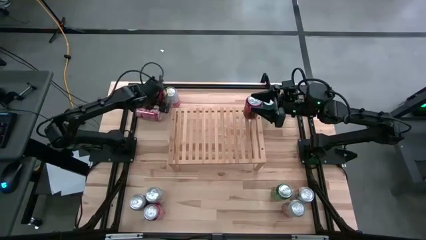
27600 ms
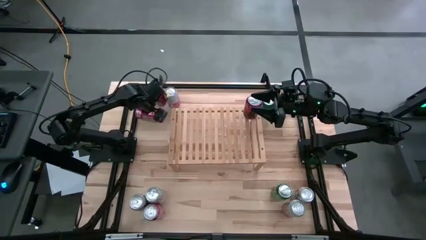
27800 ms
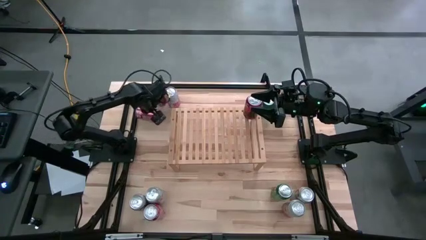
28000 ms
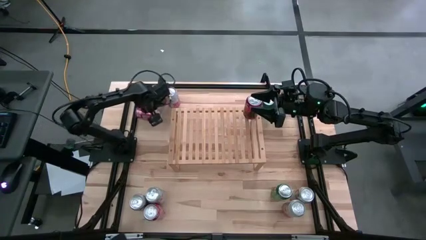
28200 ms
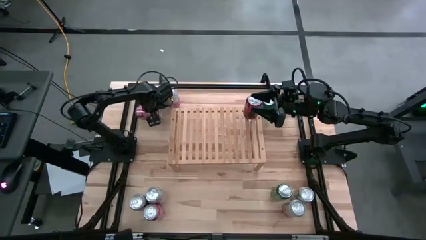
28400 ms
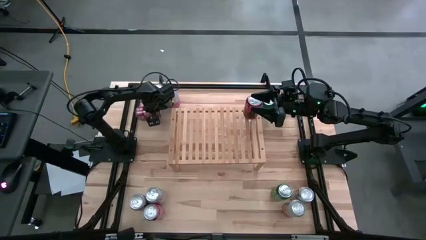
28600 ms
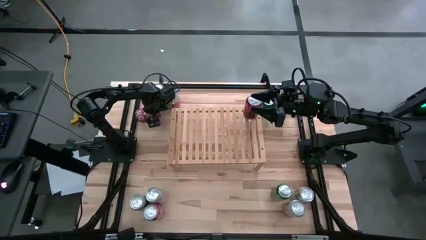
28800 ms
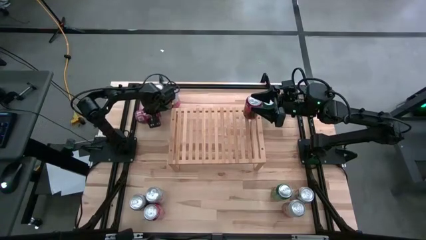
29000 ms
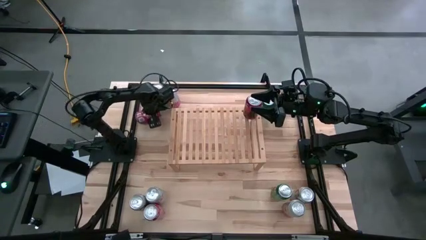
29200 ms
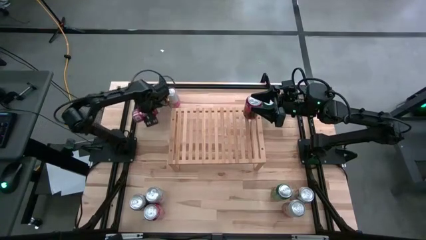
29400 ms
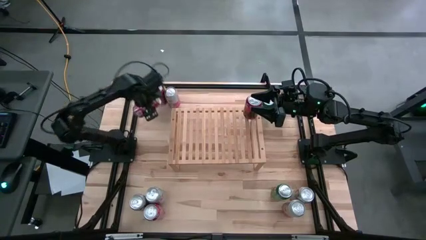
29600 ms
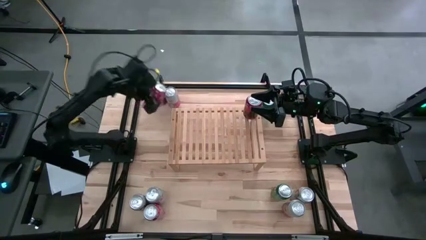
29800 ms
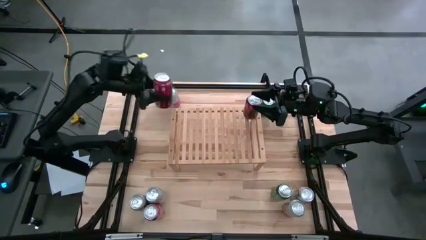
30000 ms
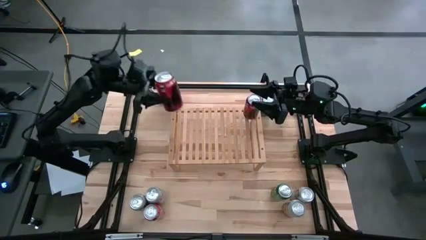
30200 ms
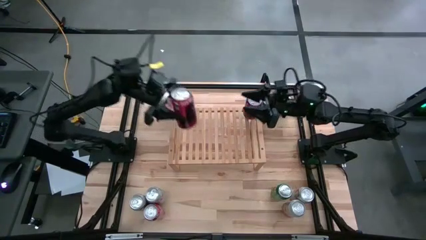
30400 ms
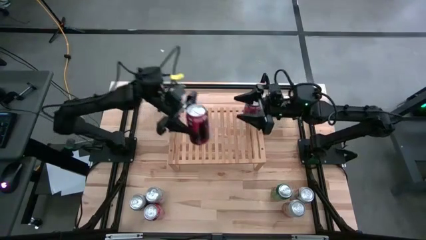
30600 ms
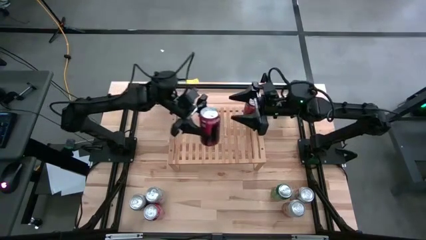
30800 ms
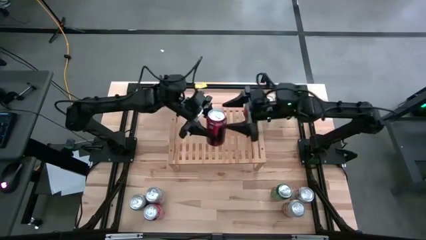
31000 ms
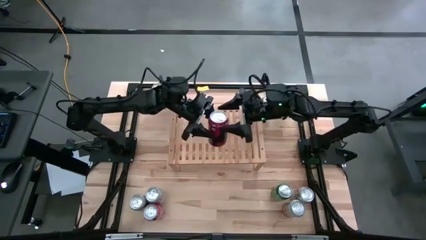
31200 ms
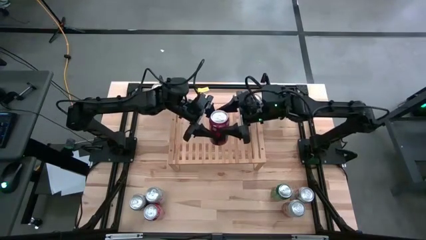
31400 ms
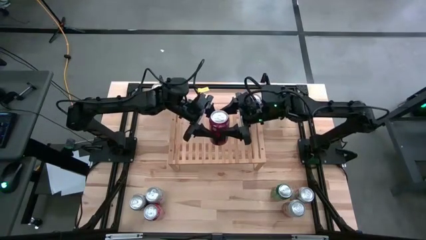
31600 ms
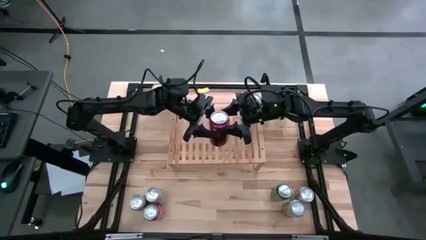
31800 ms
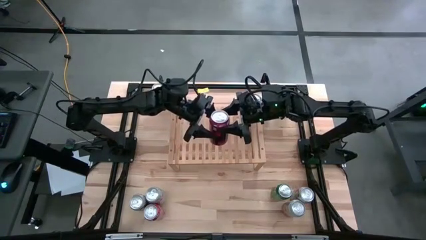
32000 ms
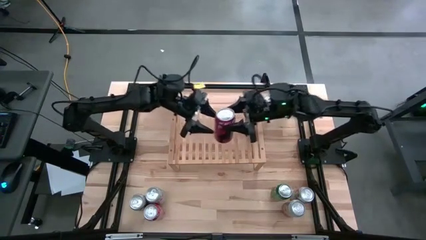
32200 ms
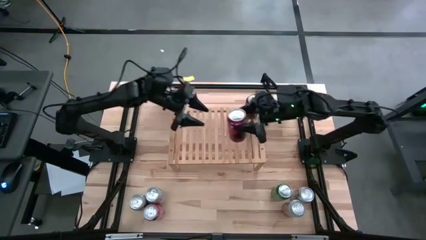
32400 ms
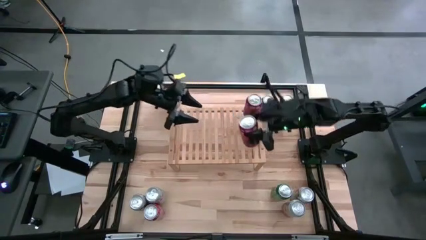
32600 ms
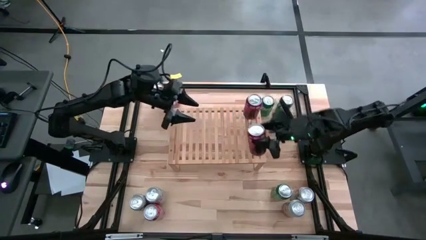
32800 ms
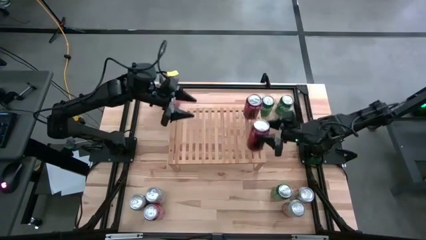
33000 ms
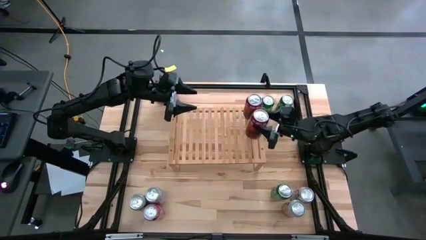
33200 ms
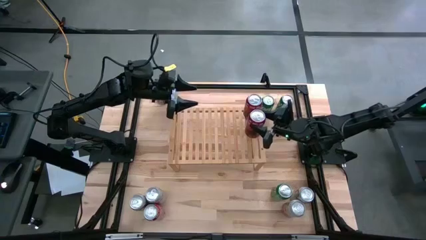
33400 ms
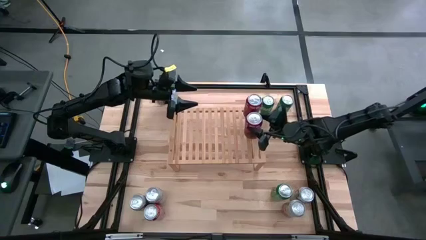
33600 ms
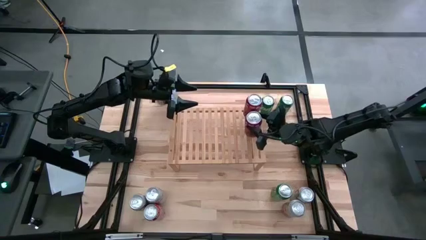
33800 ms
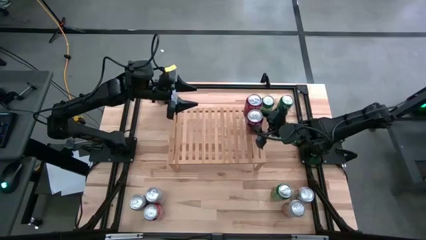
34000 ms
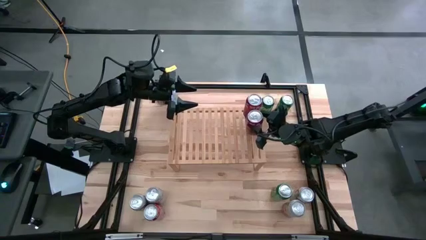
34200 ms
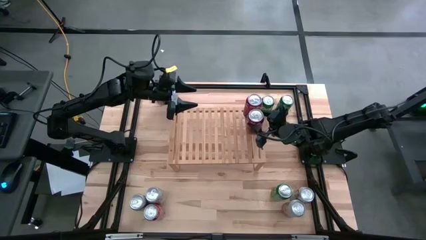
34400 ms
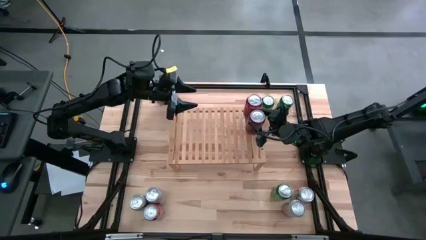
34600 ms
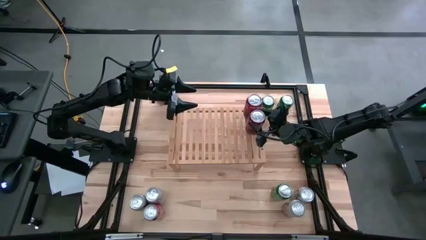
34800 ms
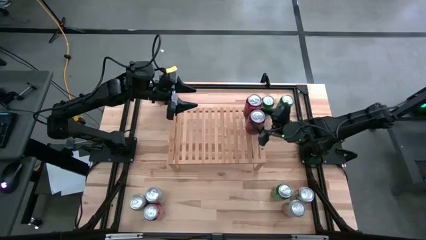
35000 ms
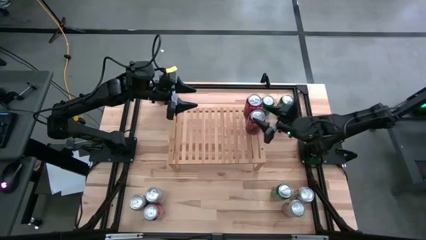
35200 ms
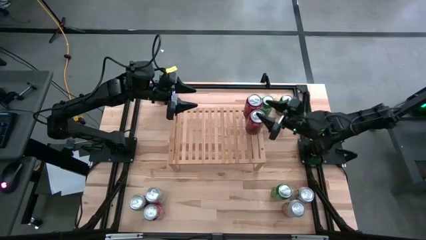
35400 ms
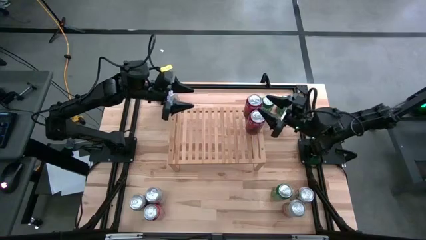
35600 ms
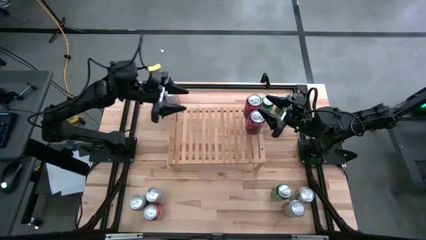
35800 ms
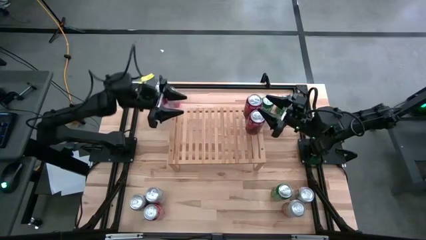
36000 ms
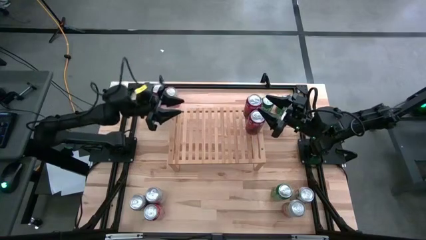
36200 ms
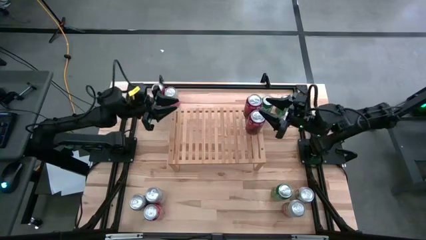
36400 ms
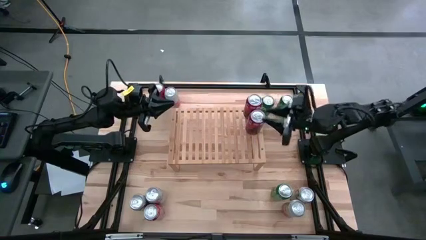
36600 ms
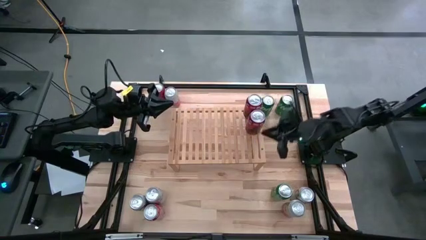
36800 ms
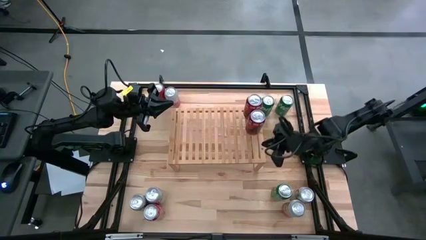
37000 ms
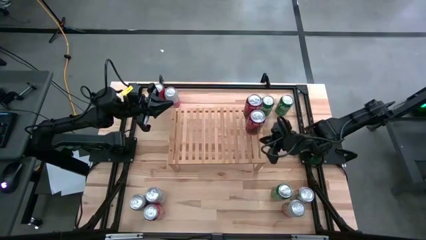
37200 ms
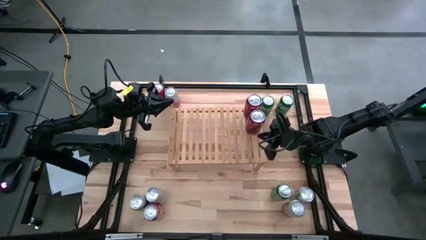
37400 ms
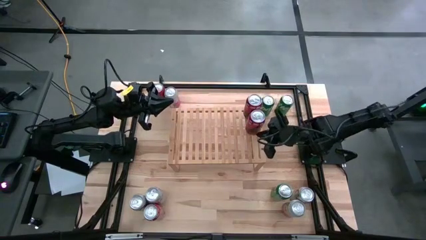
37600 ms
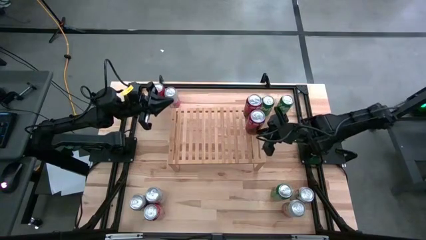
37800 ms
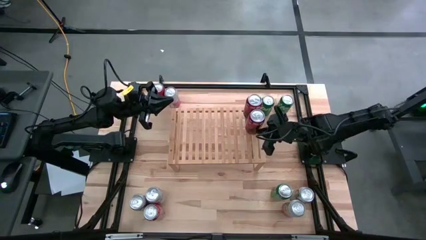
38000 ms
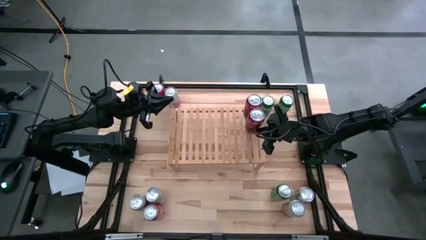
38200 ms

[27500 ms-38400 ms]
Task: Place canned beverage on shelf
Put the top left red soda can on the shelf

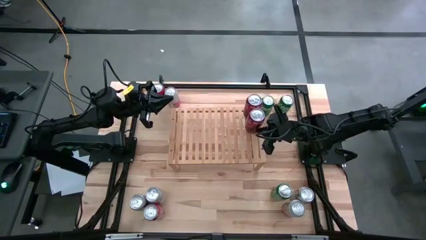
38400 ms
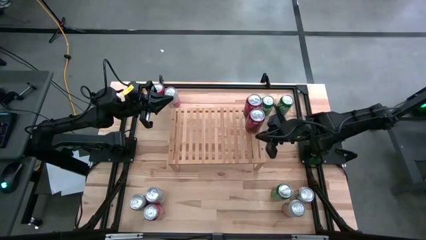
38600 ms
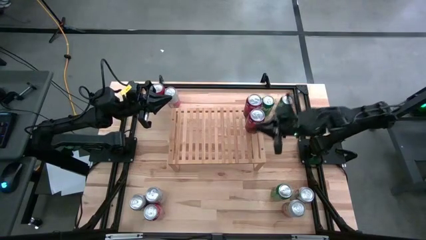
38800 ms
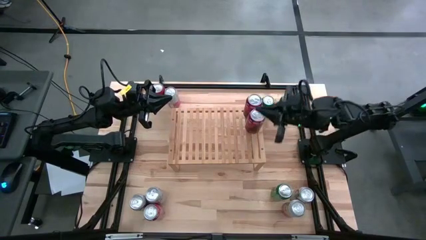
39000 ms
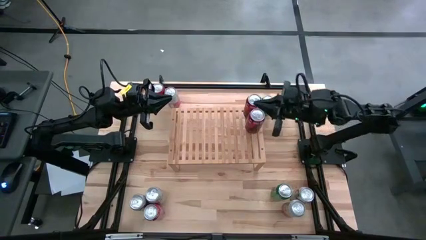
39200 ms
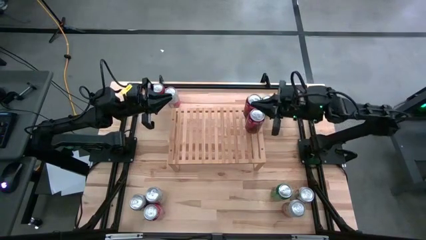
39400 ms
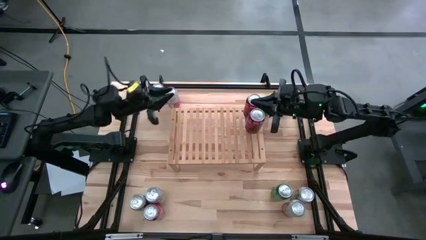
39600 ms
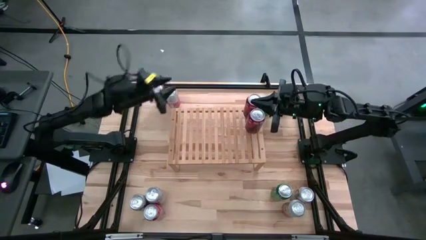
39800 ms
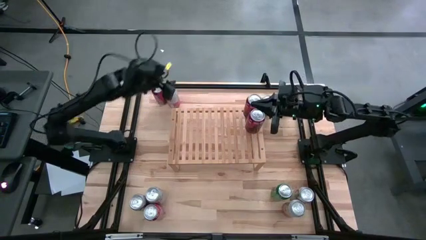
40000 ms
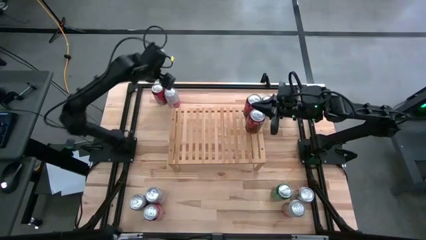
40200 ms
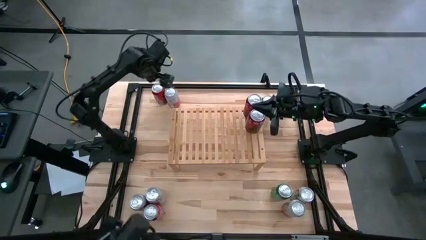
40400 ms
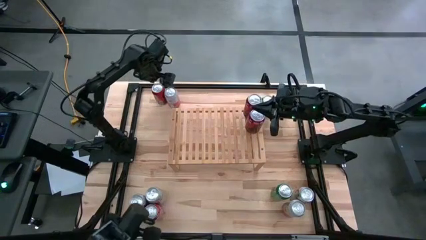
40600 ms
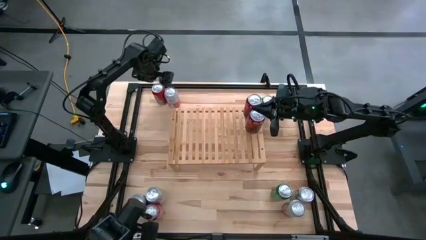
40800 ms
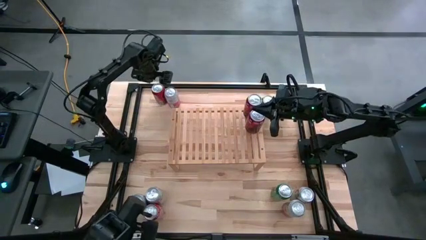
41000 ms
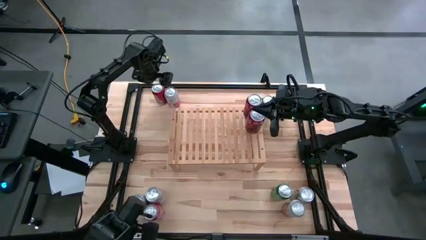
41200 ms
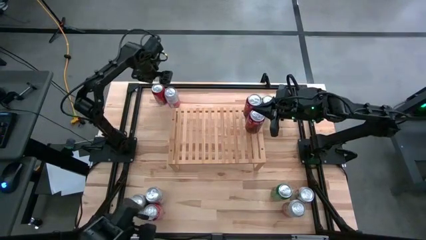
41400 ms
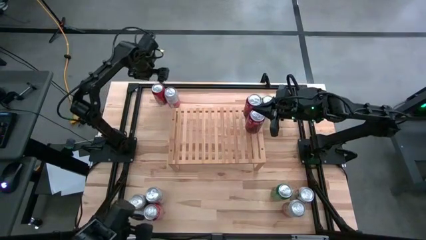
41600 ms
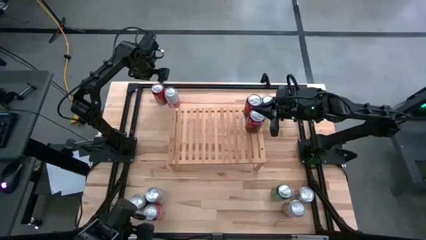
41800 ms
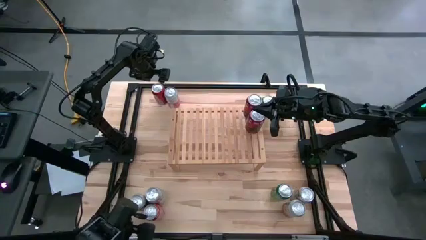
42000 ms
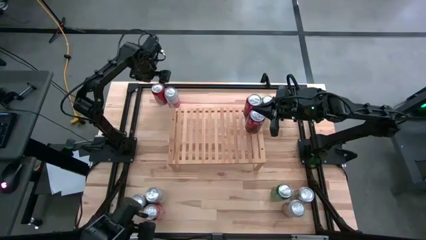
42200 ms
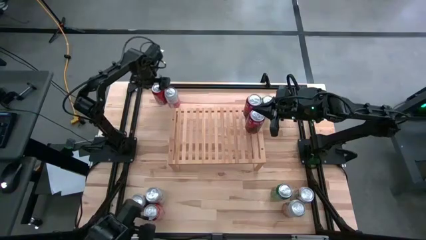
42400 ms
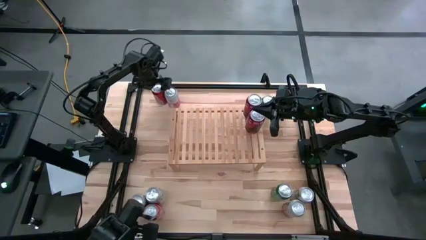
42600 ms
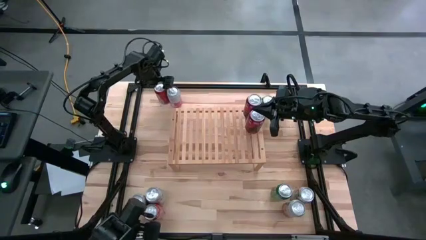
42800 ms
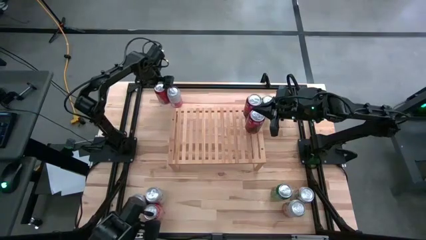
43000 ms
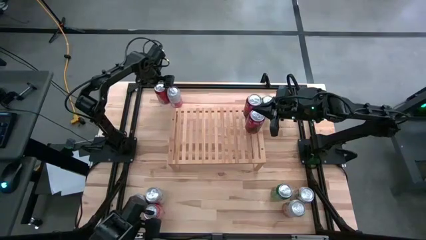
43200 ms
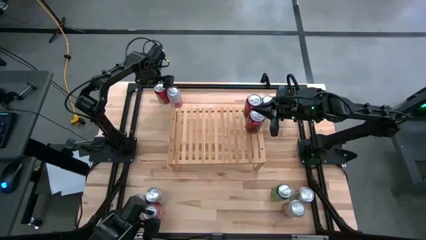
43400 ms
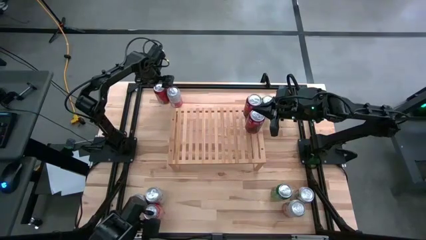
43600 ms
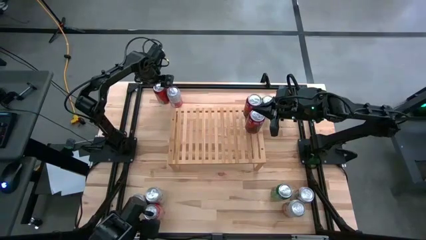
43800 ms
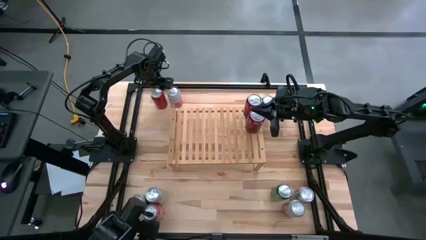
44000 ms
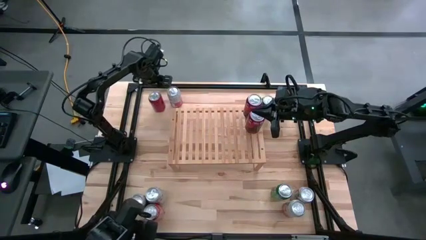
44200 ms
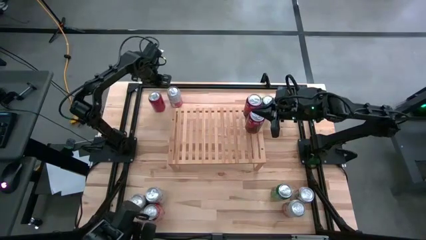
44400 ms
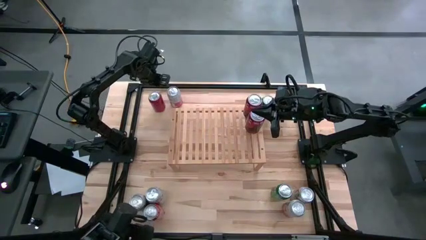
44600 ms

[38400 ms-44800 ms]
Put the top left red soda can on the shelf

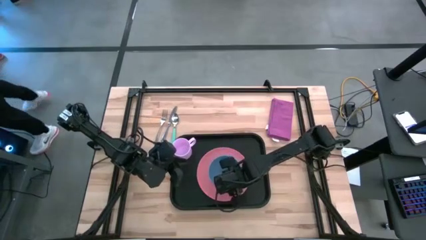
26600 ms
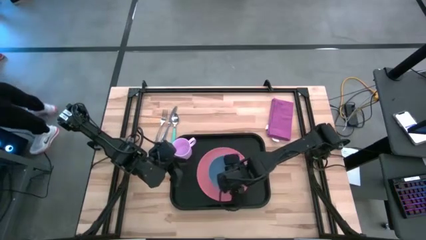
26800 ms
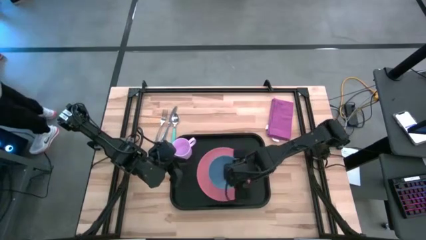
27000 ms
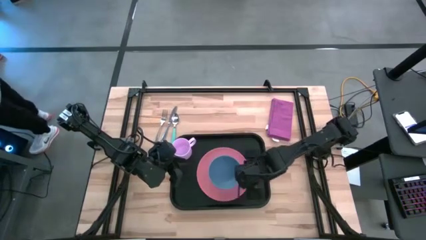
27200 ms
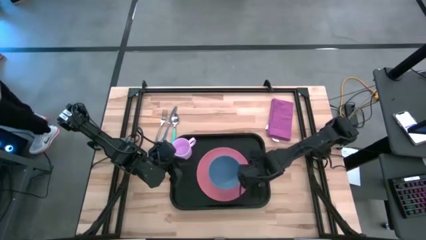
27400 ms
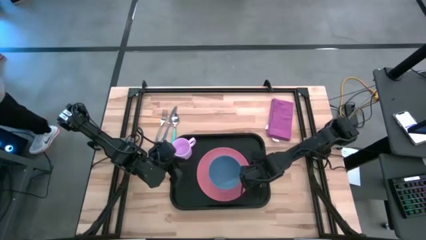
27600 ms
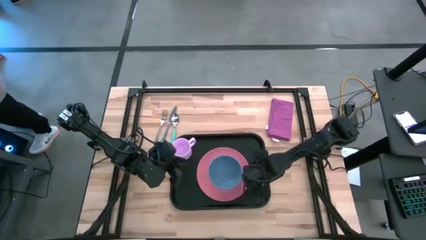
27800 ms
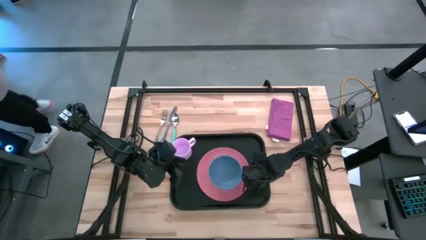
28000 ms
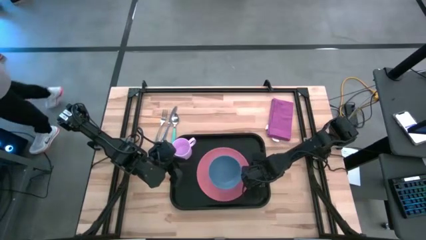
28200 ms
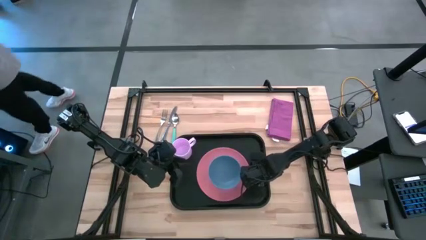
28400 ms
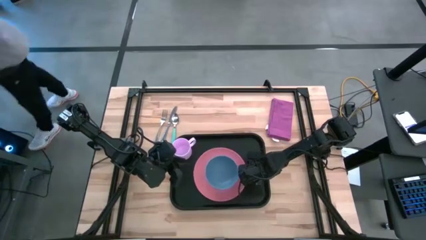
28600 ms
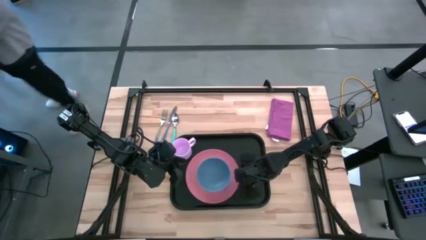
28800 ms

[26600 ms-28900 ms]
Task: Set up tray
Adjust the pink plate on the black tray
